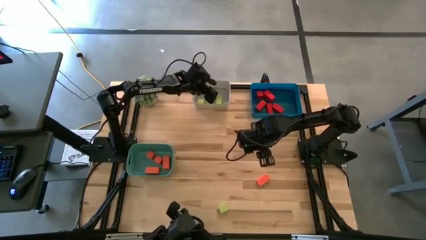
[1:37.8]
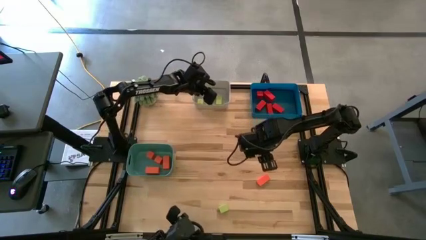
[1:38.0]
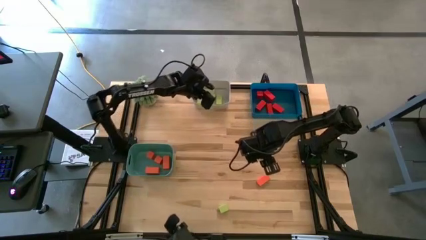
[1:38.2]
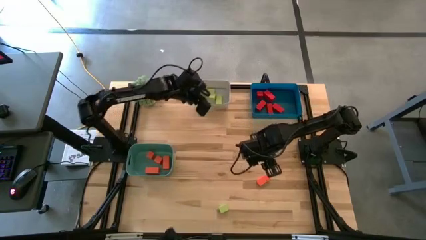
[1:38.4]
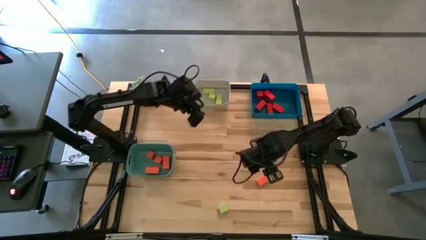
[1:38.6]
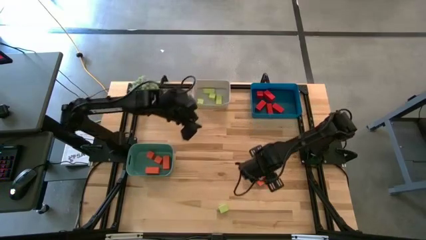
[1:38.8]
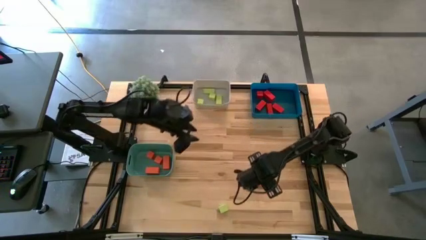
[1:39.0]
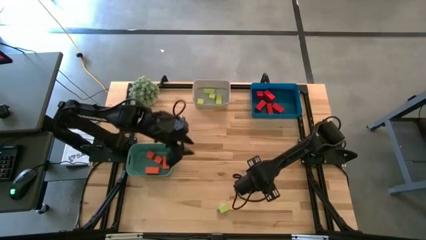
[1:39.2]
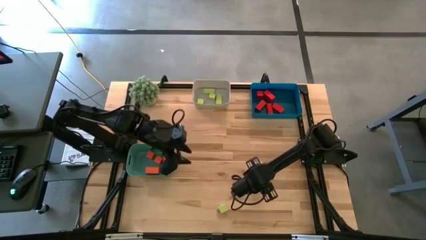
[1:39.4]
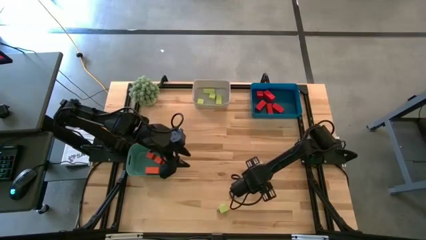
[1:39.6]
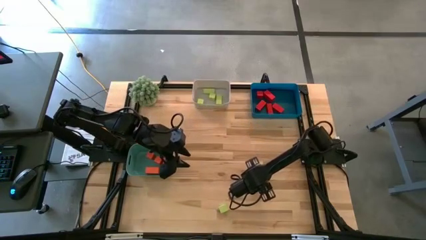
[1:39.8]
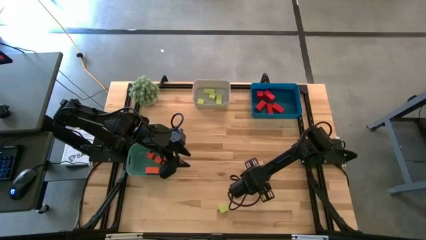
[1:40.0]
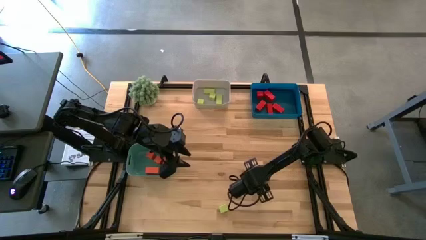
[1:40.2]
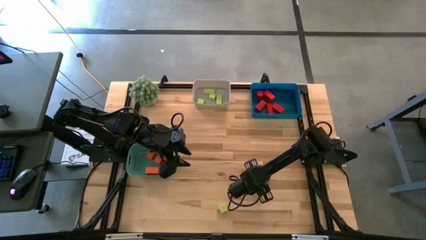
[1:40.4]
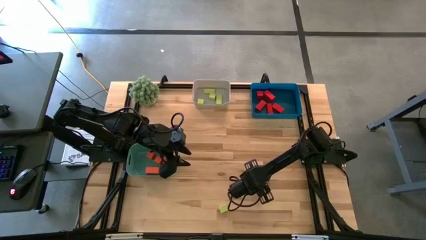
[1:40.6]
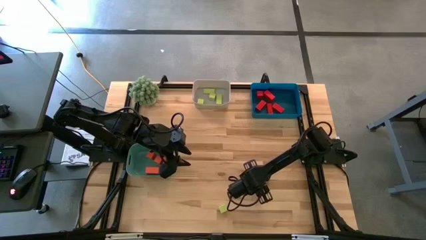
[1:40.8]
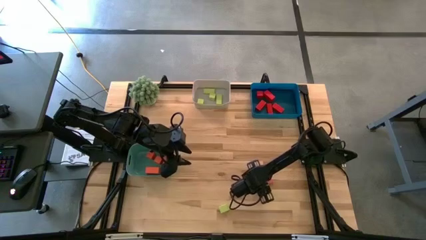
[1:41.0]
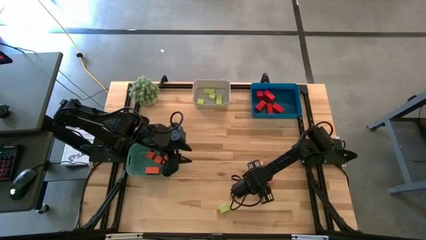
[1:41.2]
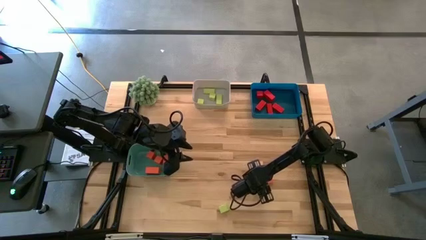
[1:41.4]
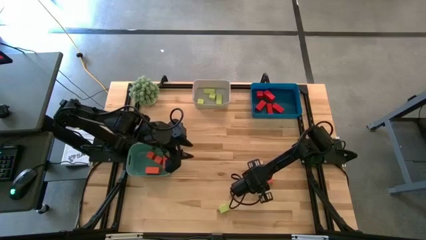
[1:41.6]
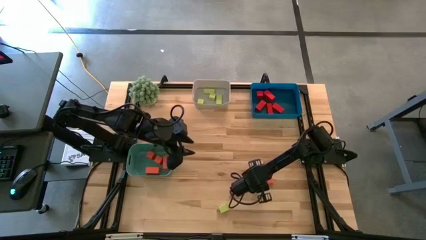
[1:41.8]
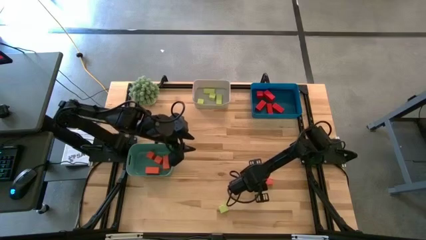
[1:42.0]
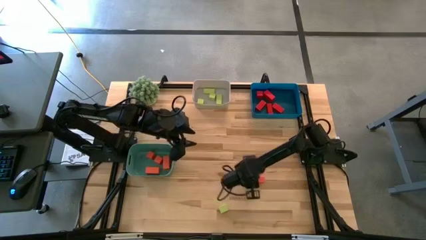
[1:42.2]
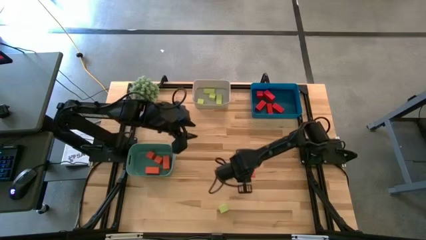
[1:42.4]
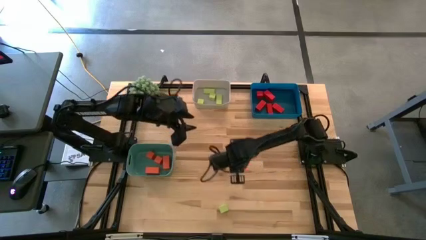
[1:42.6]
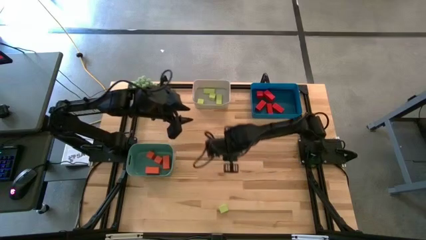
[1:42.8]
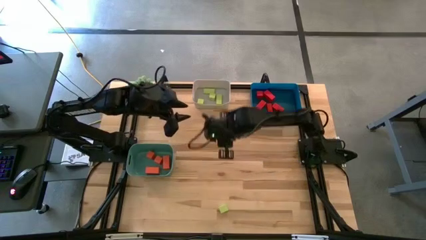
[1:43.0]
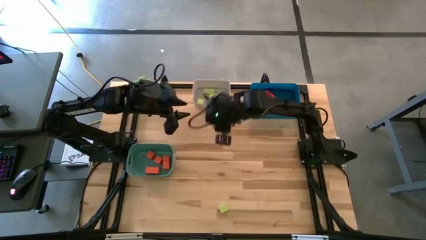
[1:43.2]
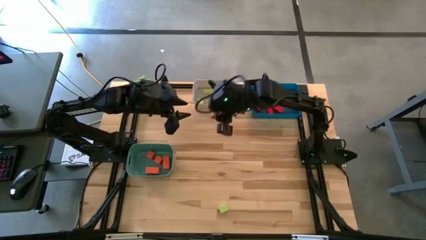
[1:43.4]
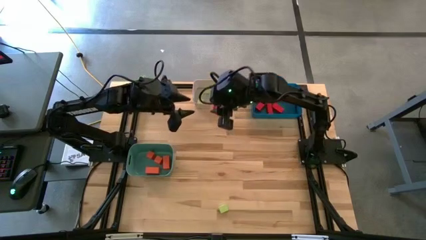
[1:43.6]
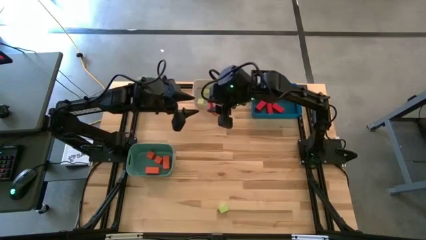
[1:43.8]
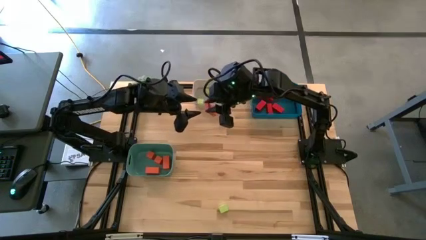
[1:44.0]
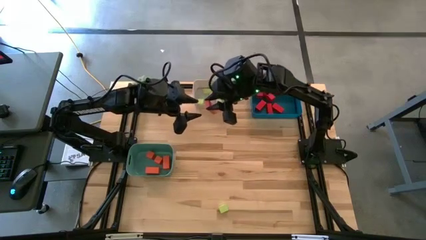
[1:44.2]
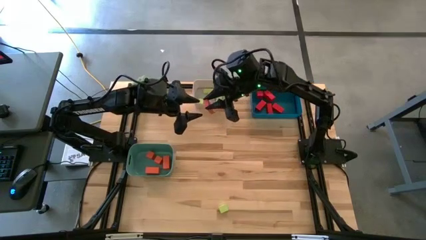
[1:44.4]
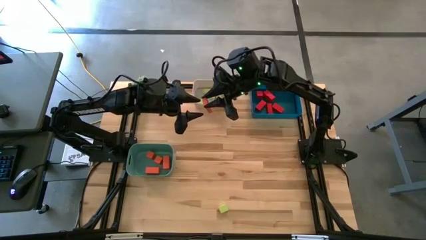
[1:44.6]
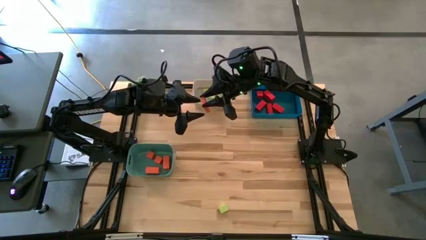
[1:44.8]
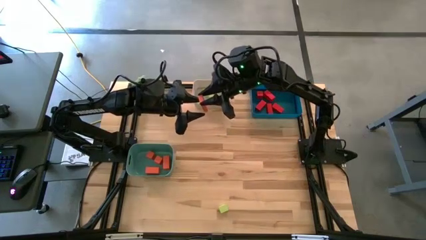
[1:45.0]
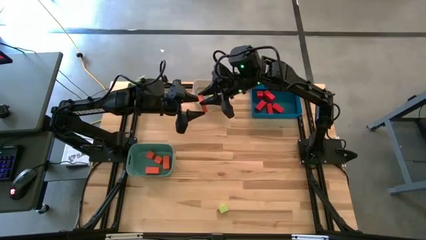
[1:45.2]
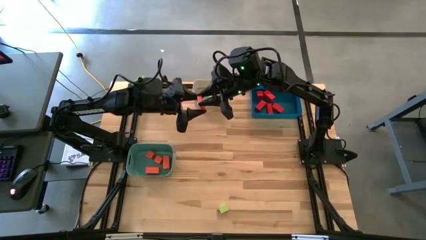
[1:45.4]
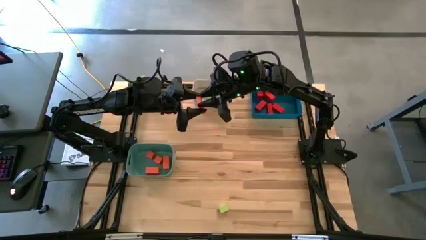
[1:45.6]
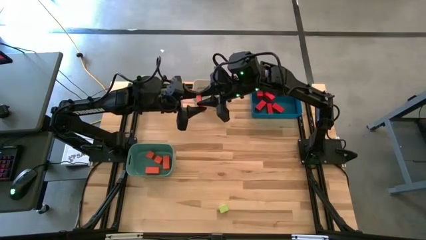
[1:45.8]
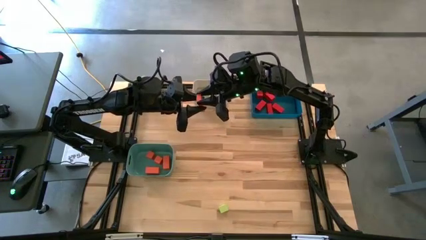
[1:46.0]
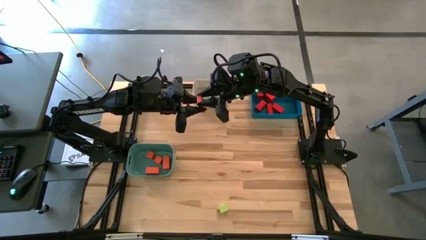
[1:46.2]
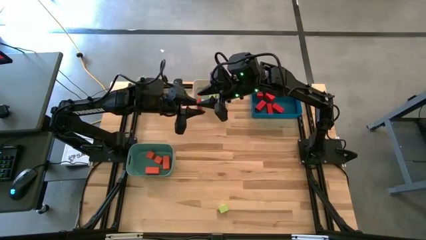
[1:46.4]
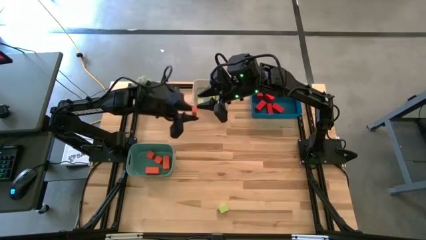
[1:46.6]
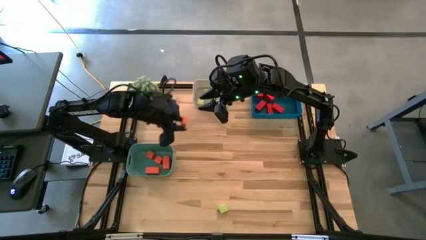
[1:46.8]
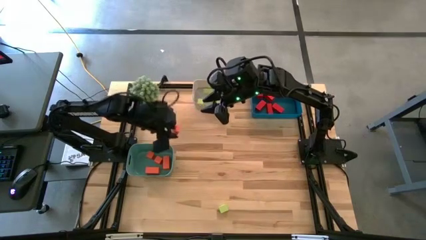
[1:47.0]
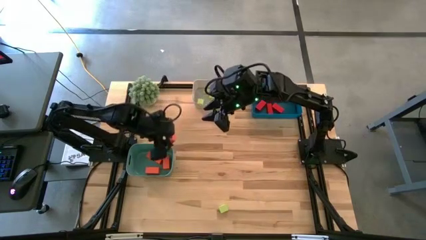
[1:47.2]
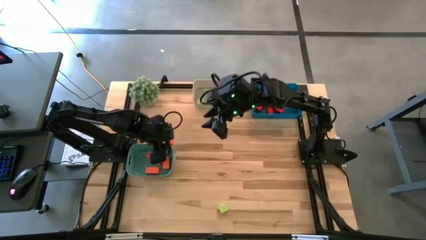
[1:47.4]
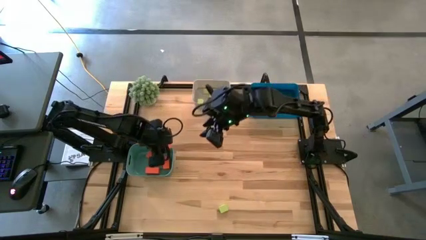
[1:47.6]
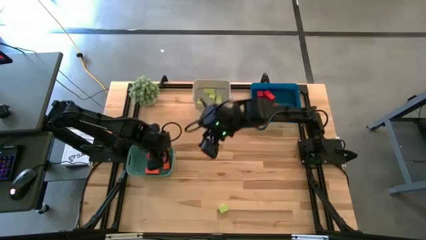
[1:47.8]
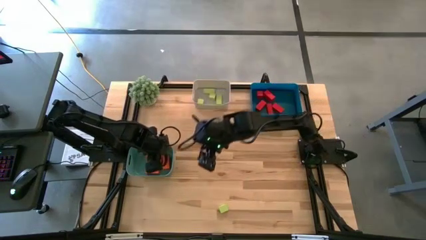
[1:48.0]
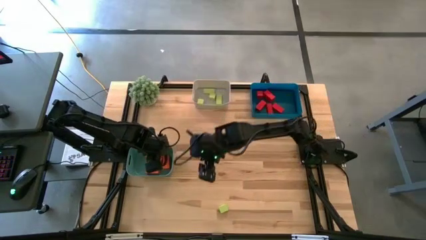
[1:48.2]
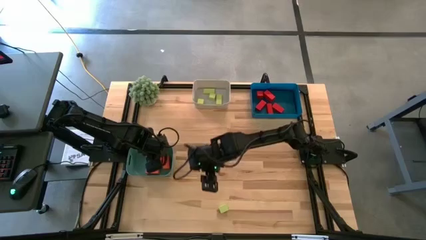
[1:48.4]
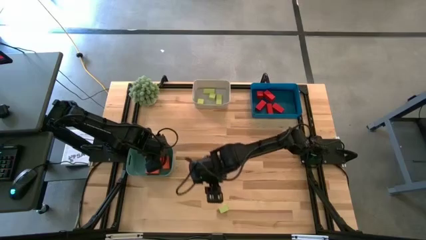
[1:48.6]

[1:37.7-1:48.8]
Task: Sort & place blocks by color
Put the orange block into the green bin

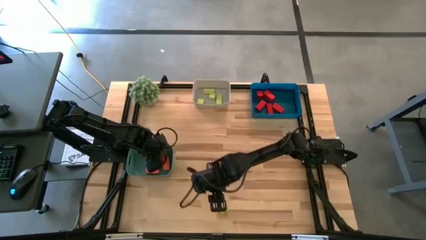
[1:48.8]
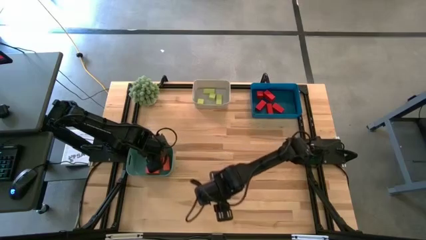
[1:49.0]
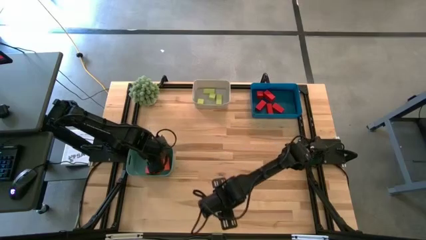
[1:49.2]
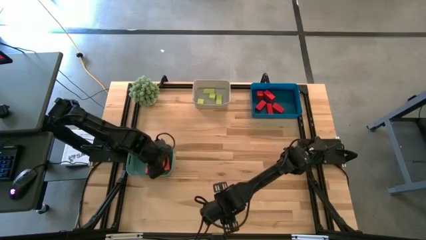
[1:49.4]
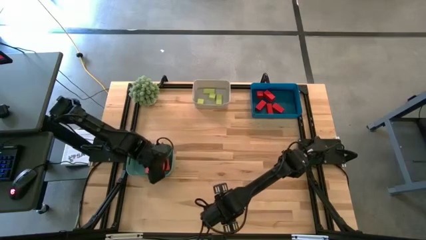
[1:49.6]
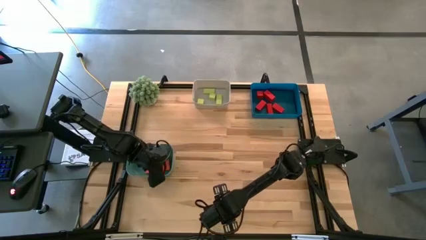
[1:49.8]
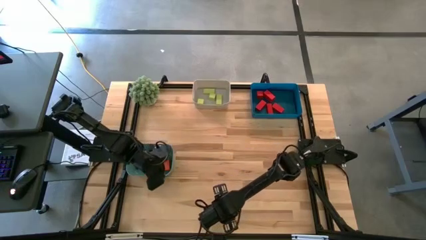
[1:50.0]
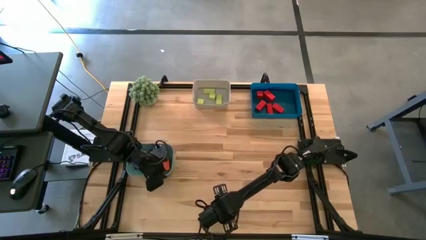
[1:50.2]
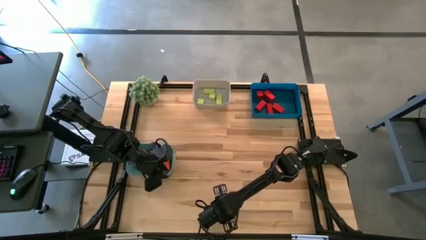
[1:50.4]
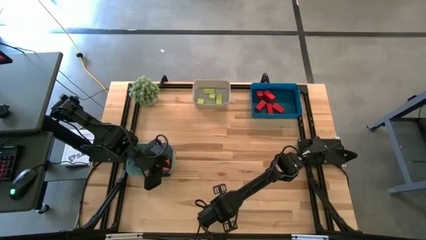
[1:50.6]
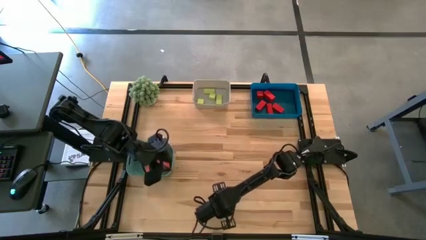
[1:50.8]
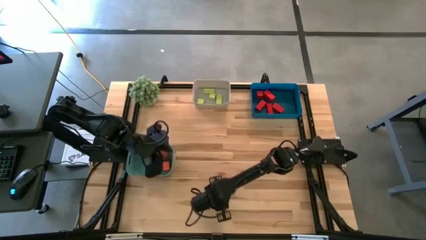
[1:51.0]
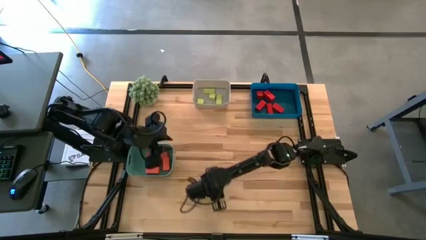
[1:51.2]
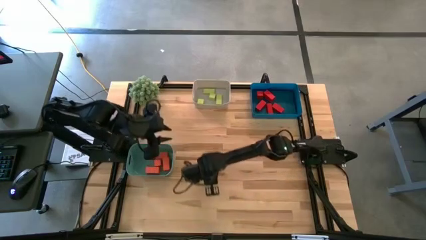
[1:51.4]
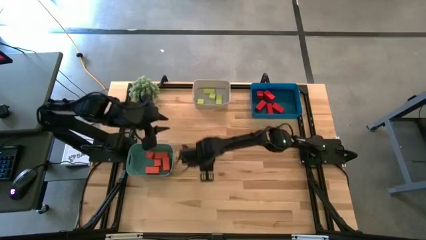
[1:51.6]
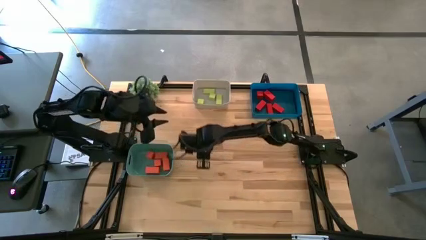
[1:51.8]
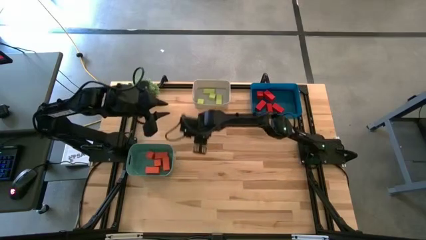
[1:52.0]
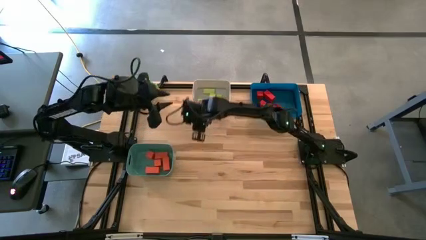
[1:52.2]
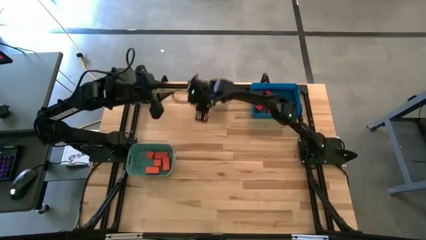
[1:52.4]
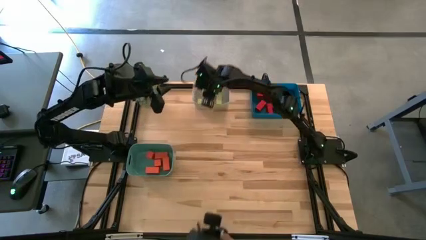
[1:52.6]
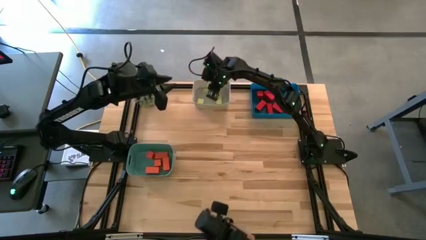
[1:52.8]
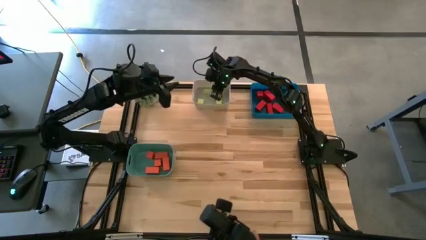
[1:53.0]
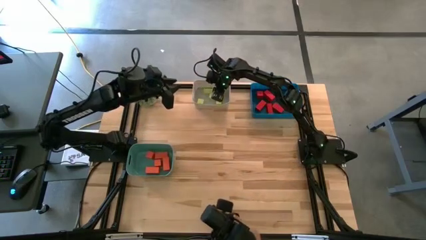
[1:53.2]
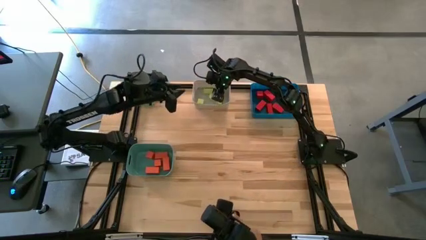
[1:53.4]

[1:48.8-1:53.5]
Put the green block into the gray bin
